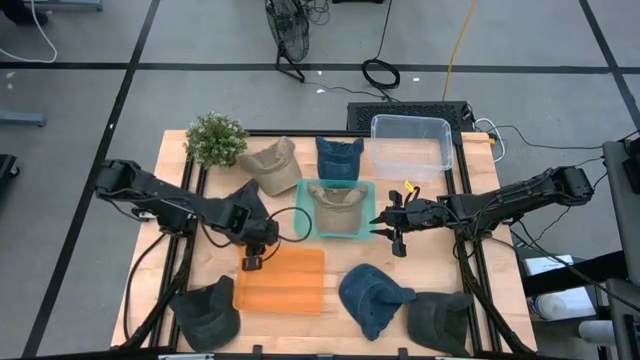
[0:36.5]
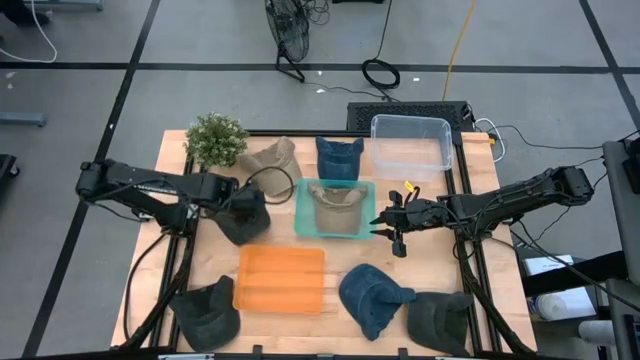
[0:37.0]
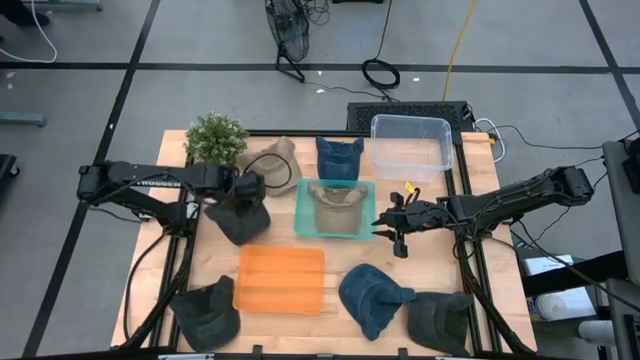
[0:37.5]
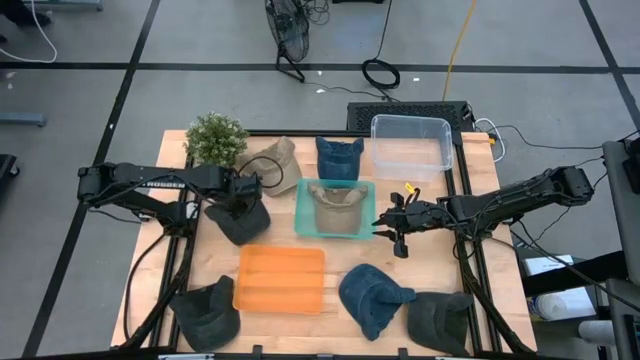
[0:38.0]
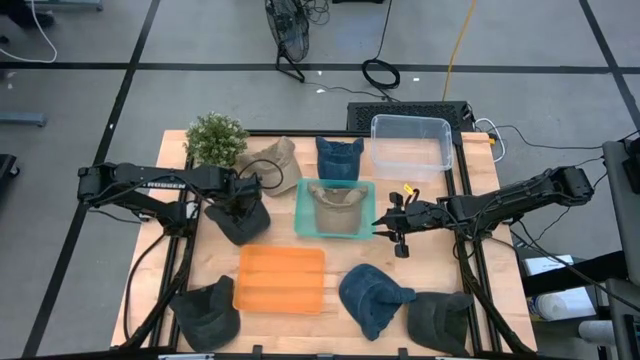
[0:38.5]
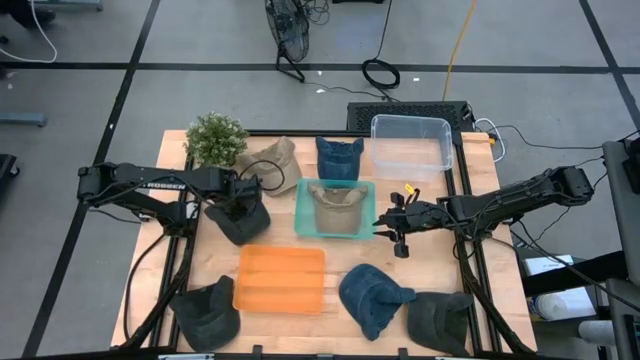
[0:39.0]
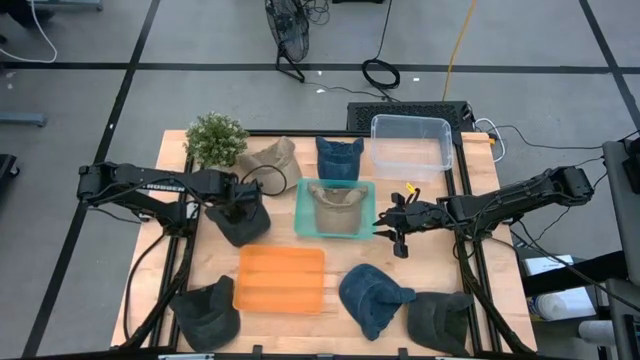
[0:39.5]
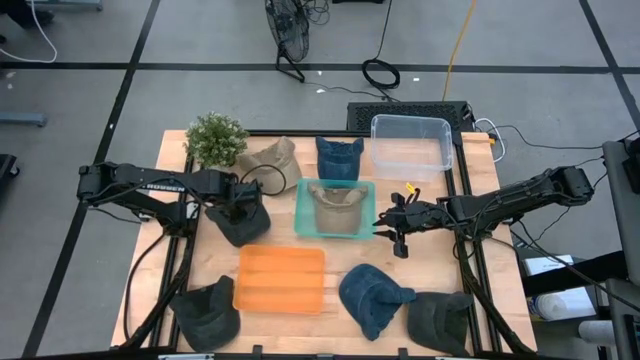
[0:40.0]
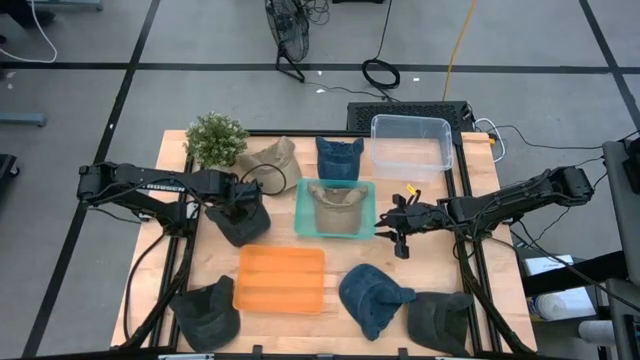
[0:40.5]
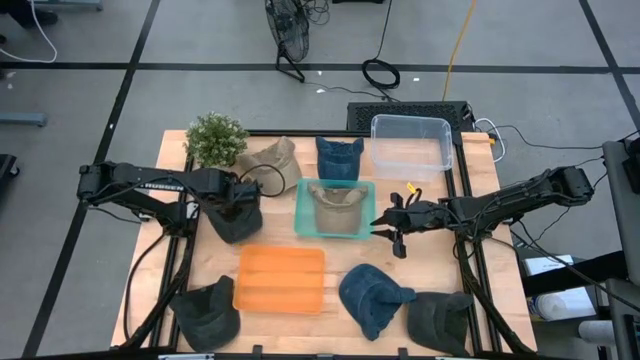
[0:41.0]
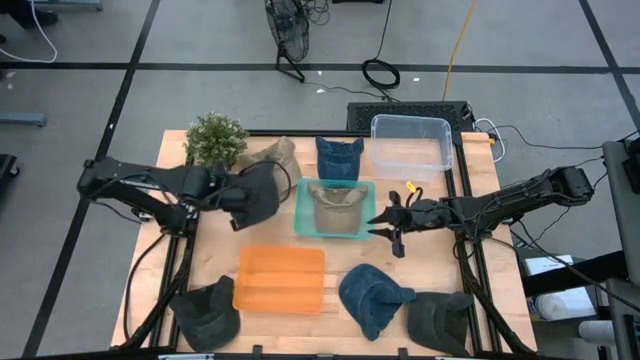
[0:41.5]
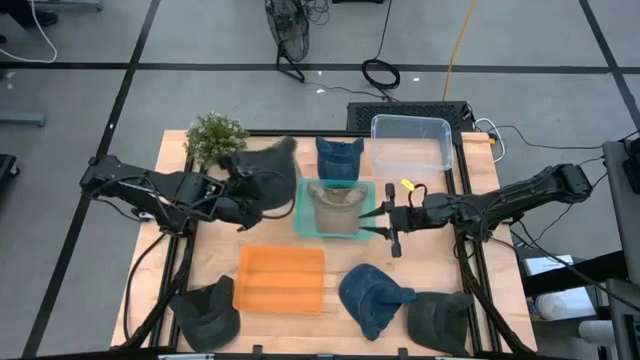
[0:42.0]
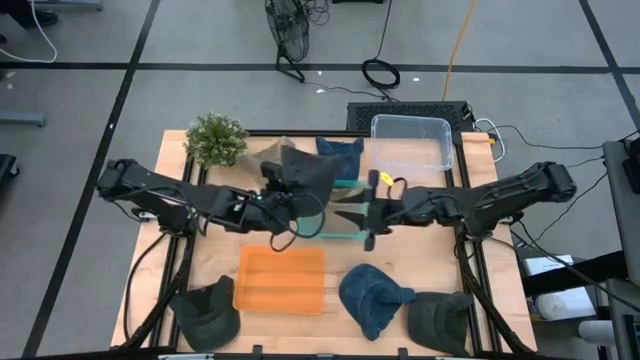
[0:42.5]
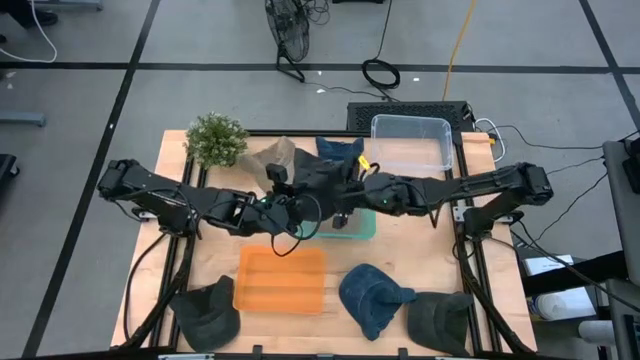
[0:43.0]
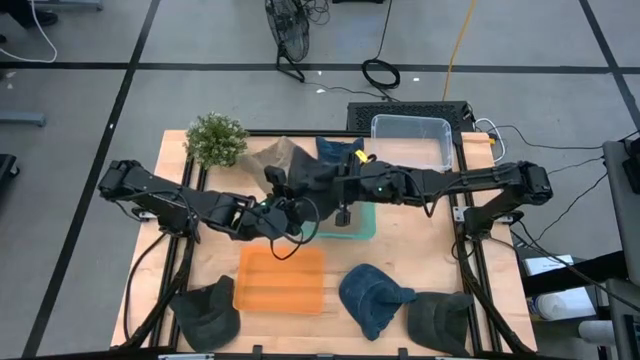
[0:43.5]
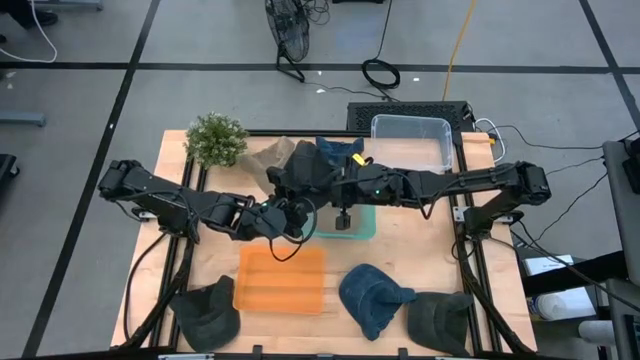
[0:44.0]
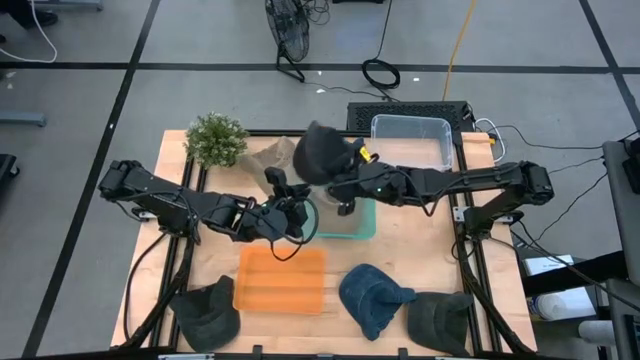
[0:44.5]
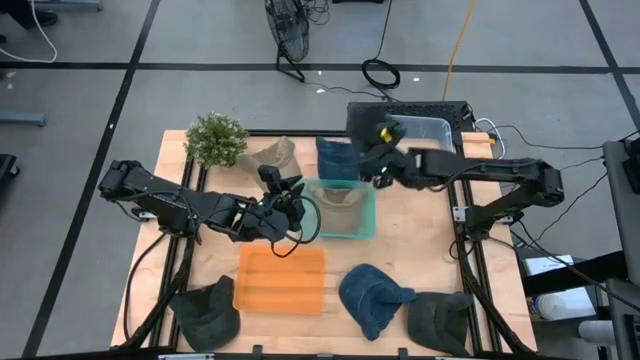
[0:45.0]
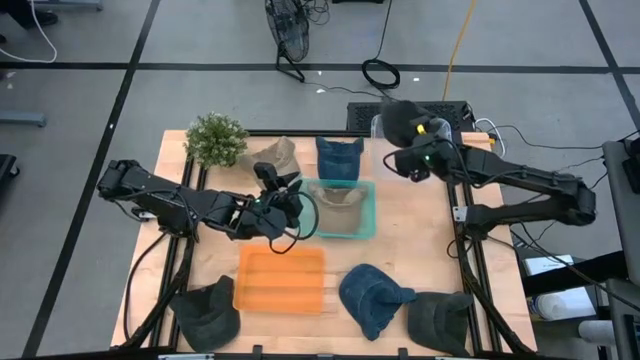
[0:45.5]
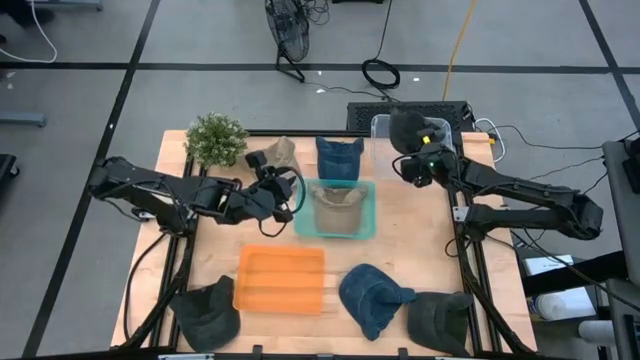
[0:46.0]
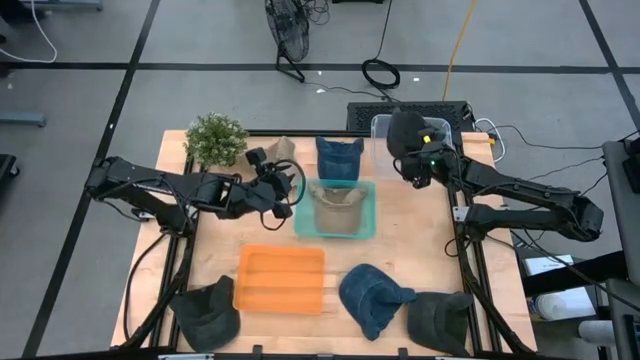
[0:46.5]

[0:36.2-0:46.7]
Task: Pick & Place hat
Put the top black cap into the transparent bin

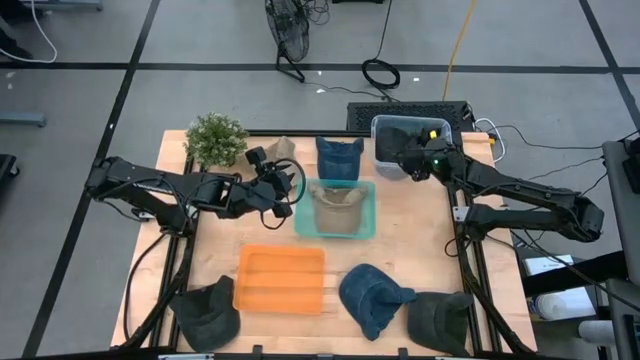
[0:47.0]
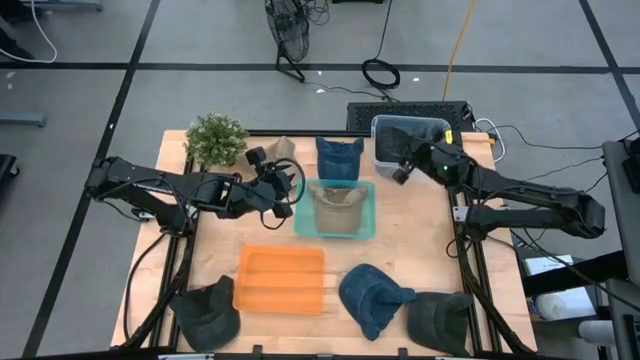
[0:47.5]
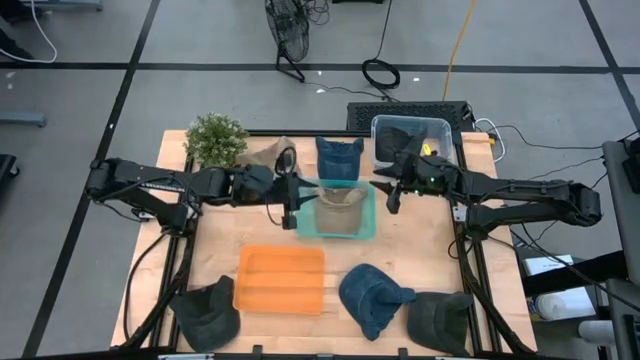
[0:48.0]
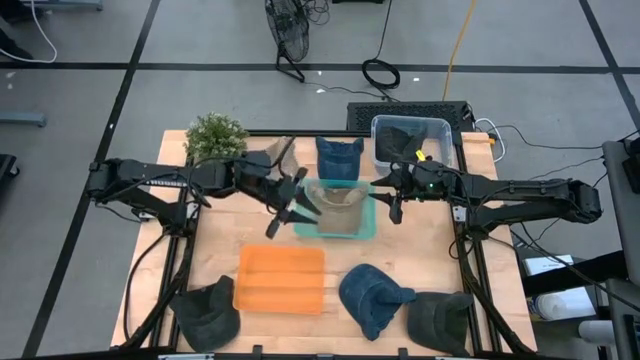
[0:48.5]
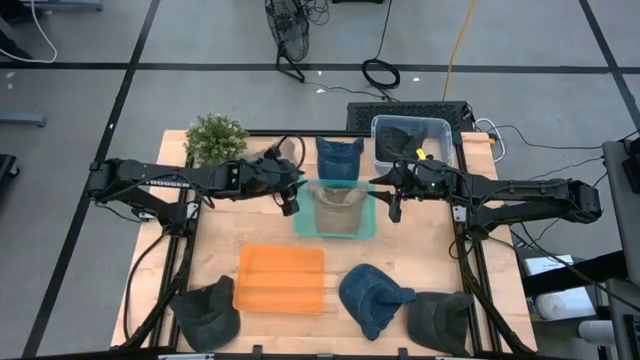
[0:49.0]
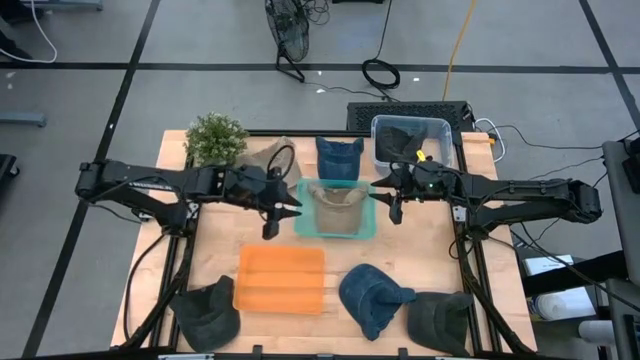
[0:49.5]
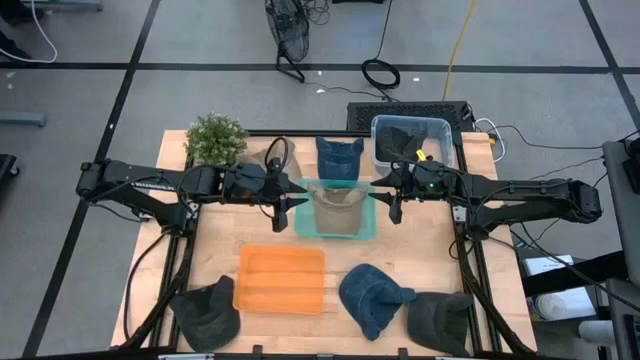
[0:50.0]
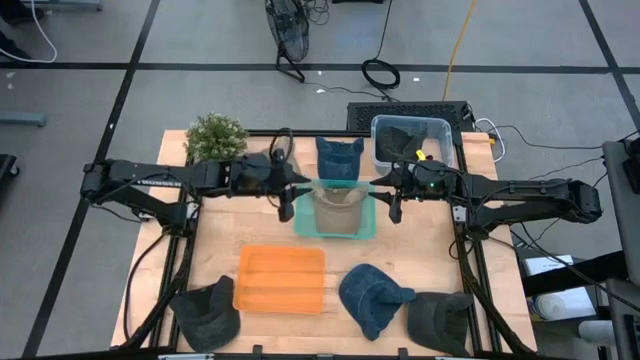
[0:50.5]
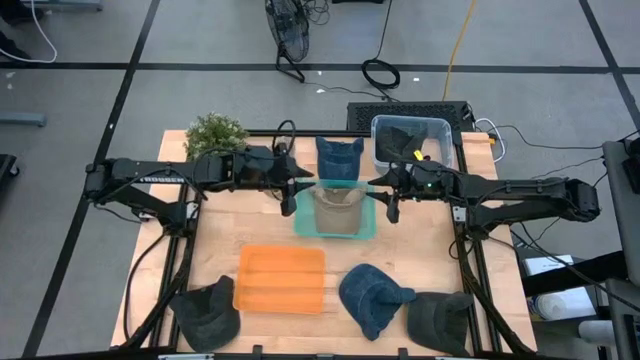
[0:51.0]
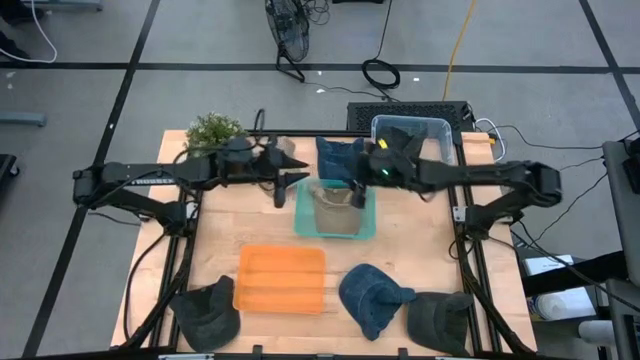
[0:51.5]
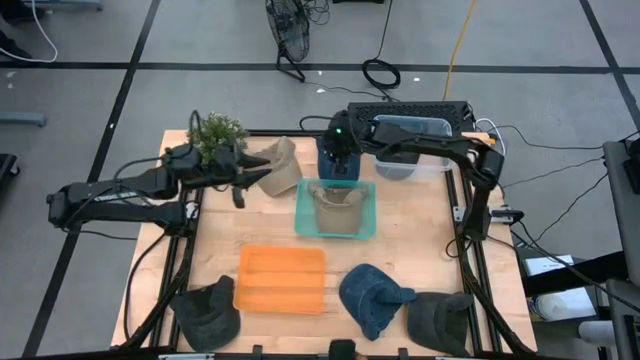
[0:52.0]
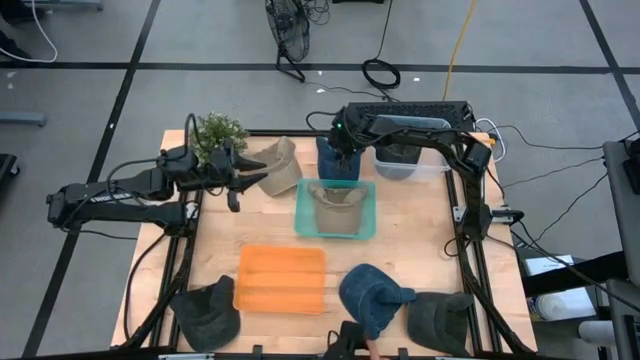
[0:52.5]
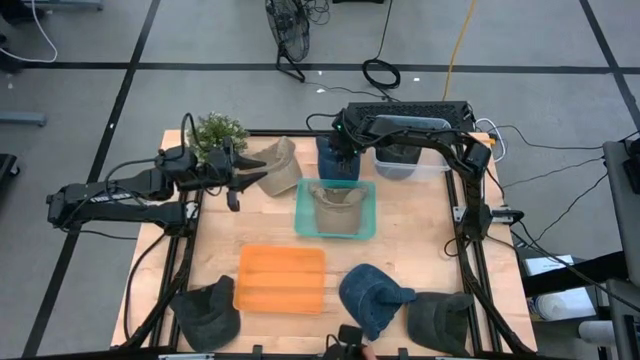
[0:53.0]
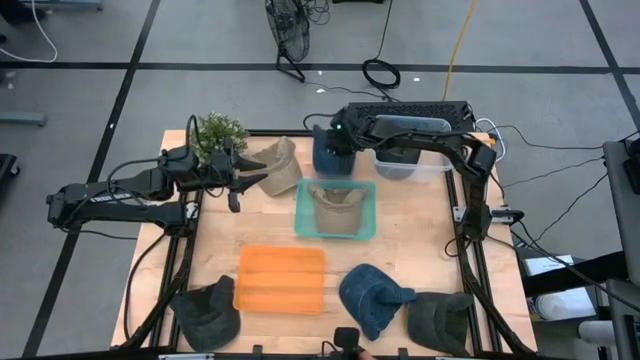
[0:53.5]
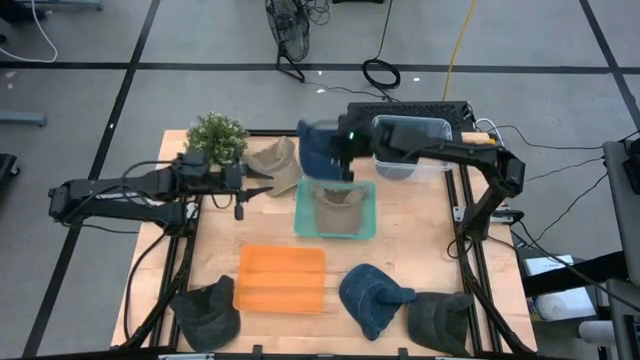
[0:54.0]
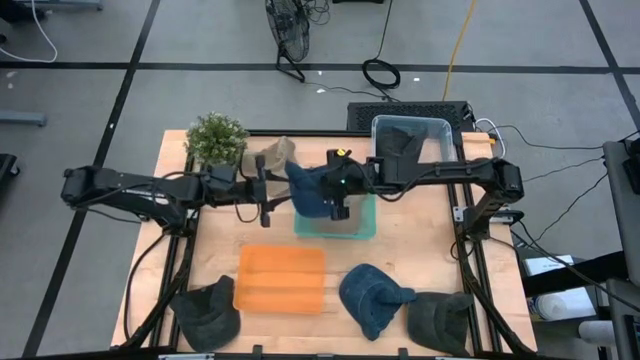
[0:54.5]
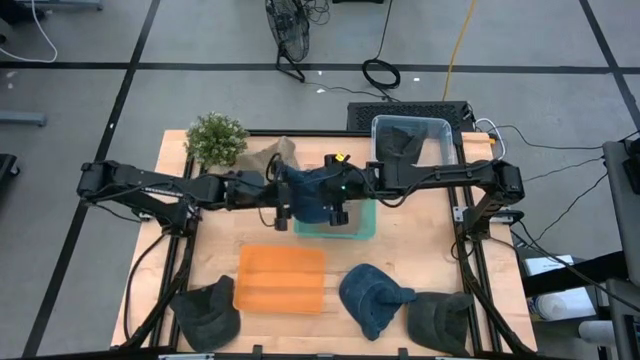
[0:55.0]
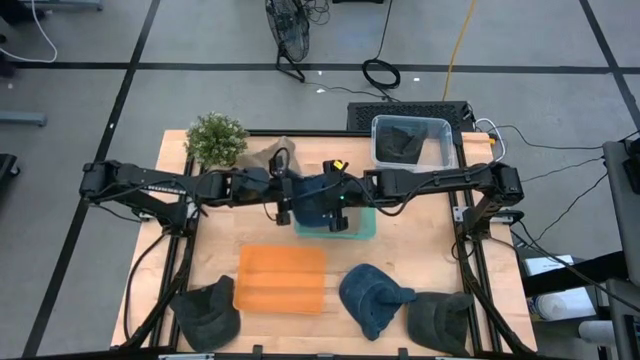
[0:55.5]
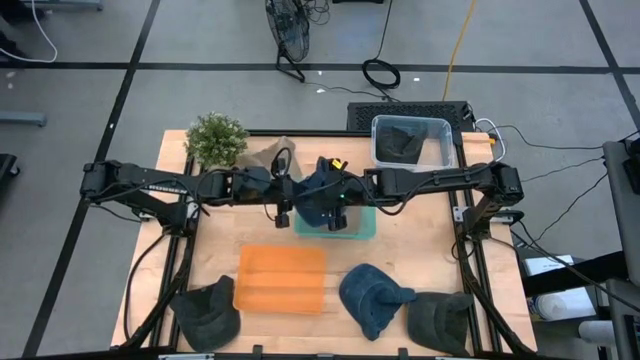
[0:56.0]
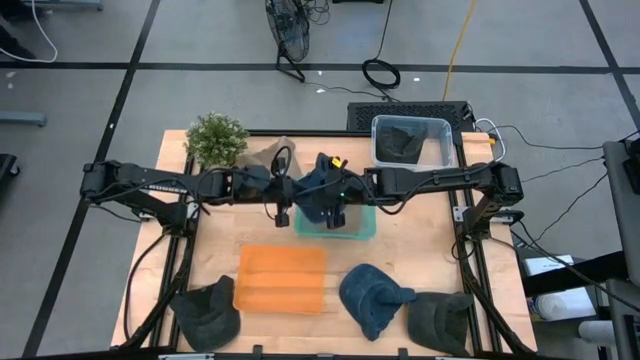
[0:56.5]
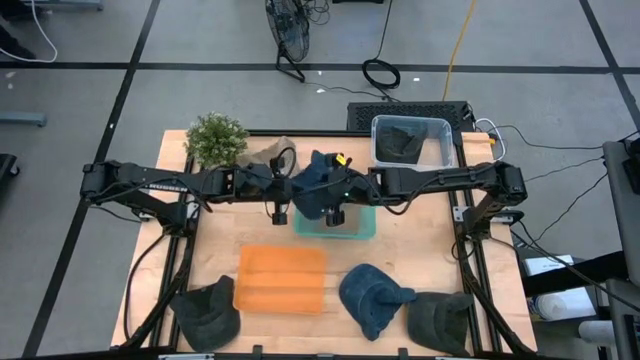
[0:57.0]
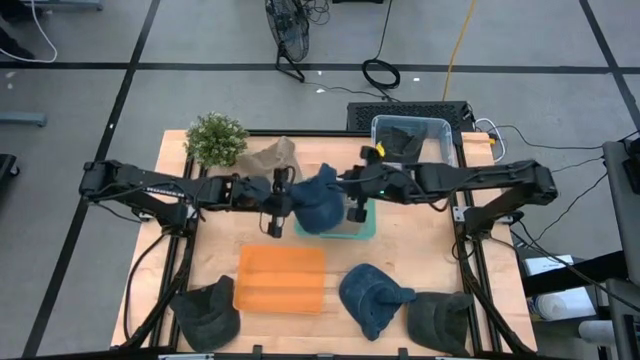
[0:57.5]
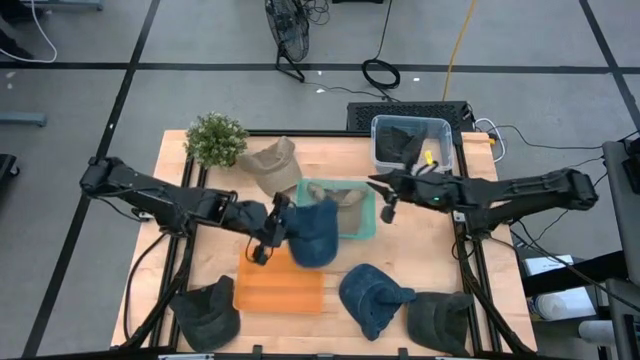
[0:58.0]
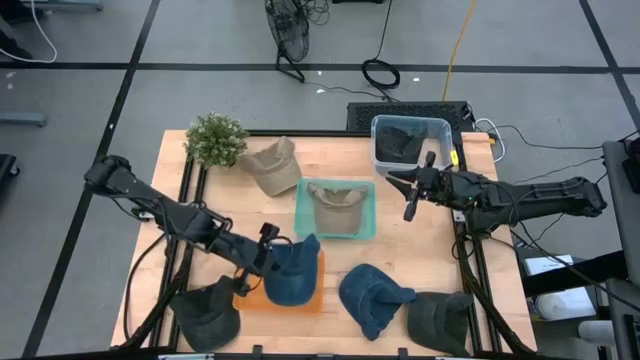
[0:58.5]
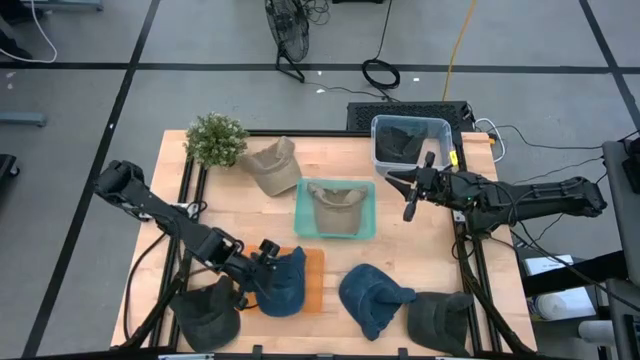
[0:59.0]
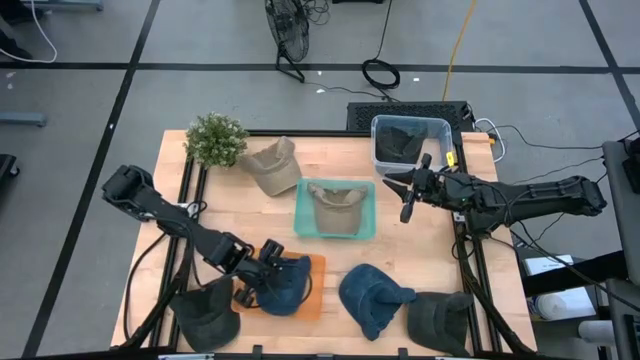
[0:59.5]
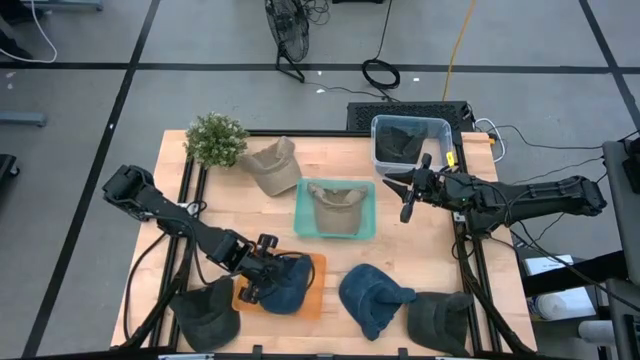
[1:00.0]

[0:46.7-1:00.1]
Put the top blue cap into the orange bin
